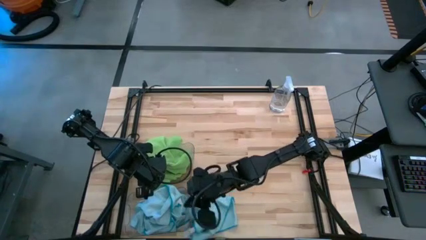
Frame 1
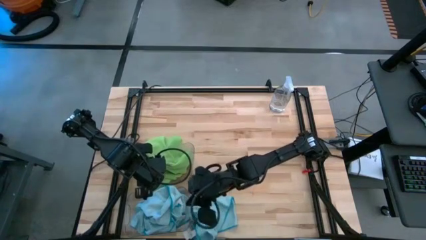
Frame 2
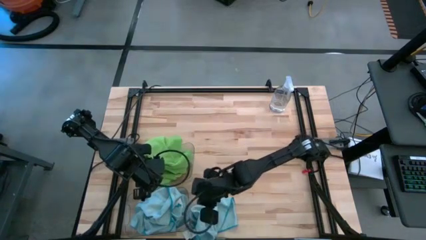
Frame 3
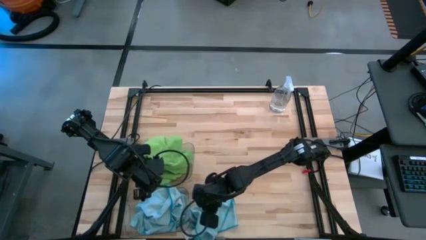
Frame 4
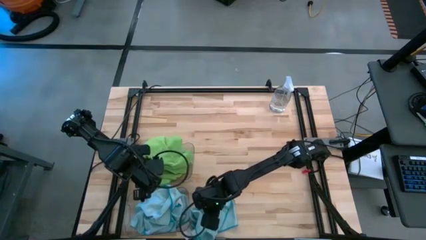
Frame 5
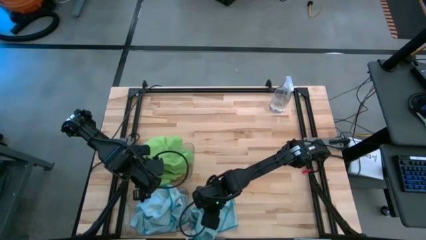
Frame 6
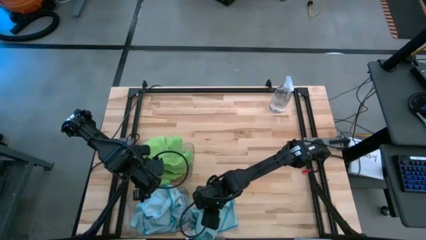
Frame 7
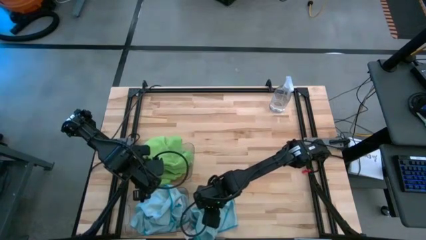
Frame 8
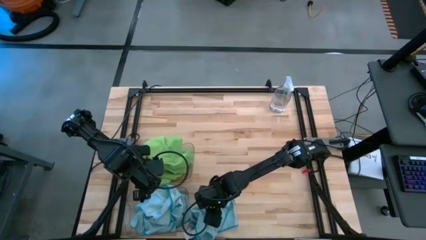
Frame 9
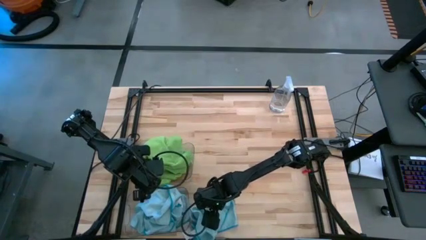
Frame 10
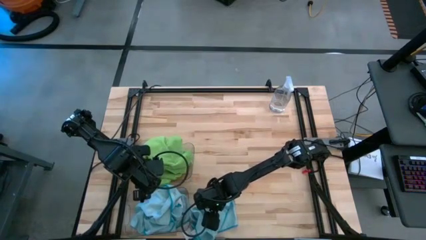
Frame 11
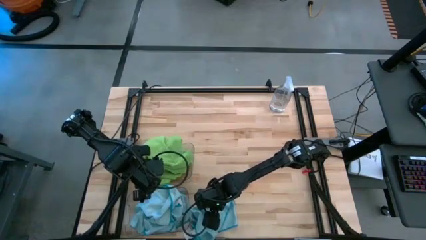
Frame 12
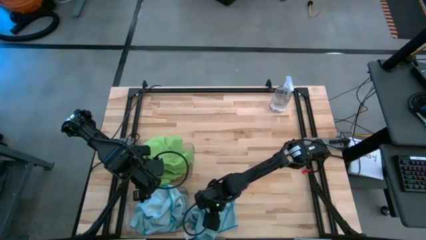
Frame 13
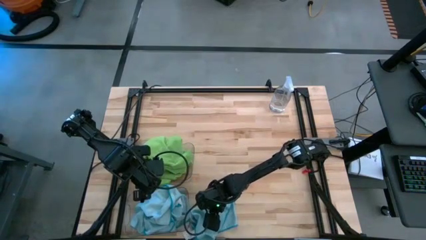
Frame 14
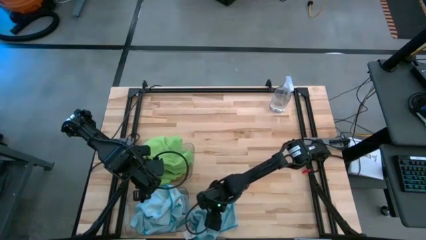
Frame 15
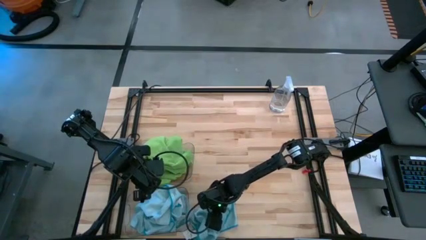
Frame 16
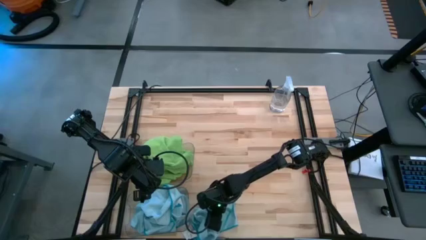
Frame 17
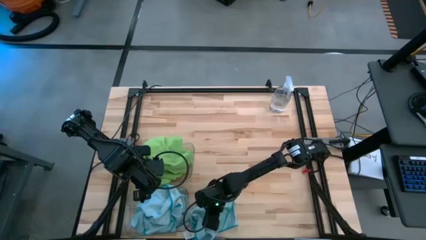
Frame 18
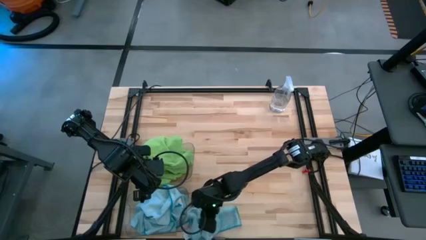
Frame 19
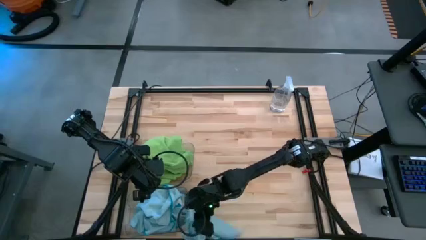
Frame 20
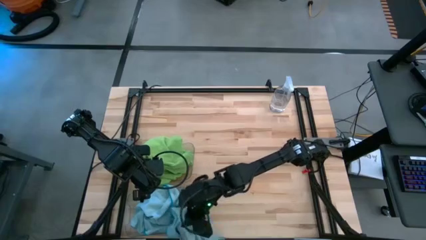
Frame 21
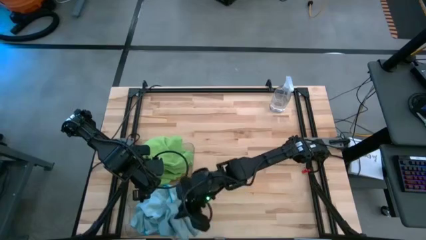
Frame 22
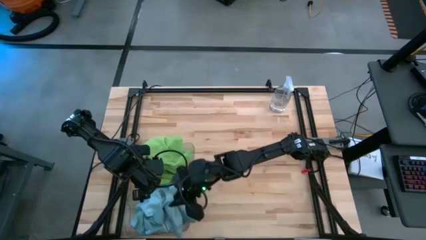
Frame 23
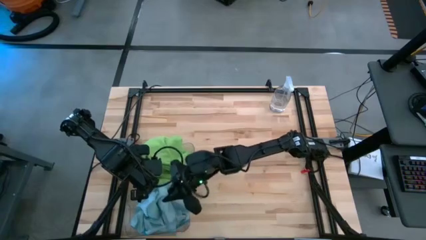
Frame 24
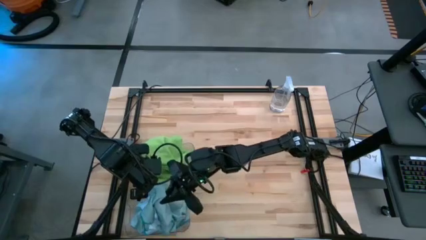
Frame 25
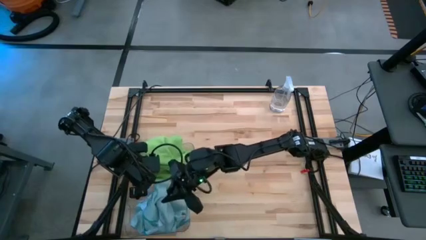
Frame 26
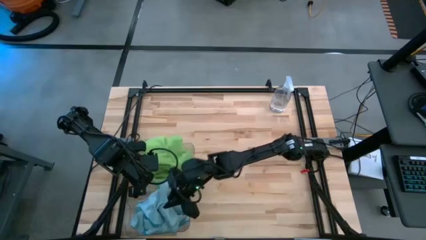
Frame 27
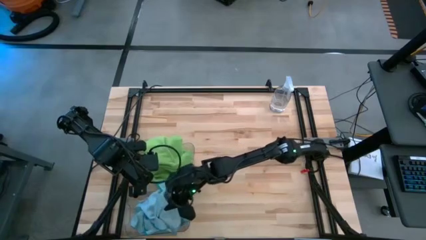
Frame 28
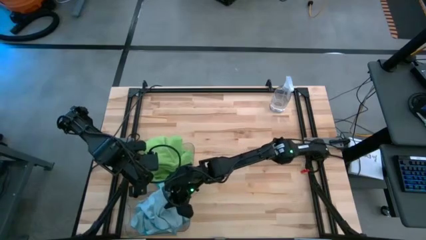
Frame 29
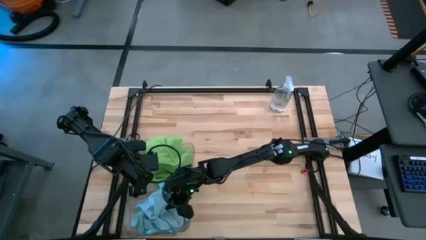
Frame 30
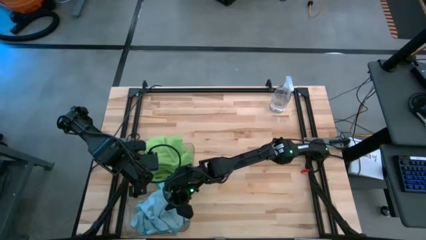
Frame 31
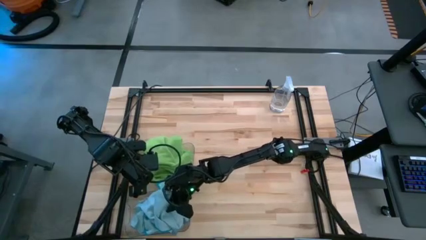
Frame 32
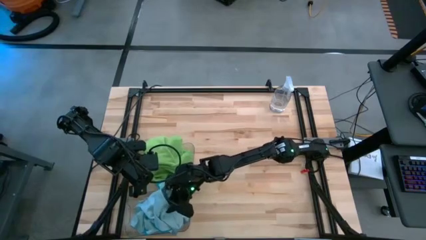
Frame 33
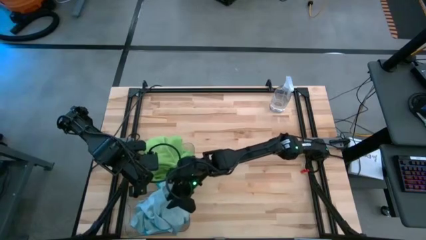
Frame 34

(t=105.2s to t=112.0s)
Task: Sort microfiber towel by color & place in baskets
Put the blue microfiber cloth into the bottom transparent bin

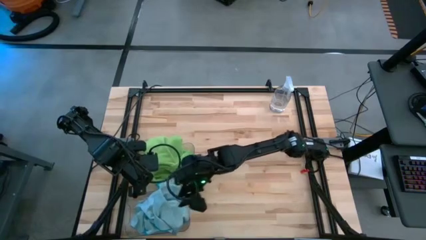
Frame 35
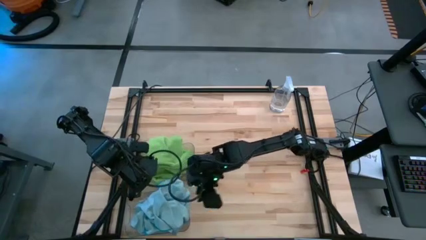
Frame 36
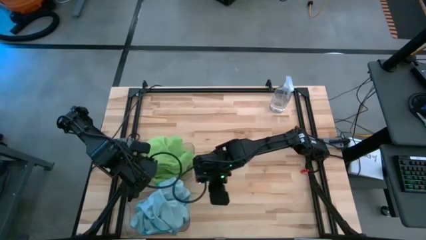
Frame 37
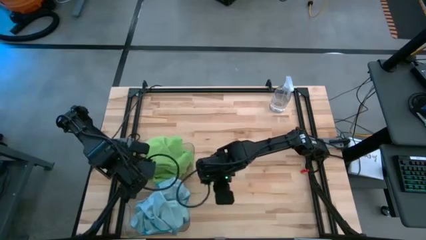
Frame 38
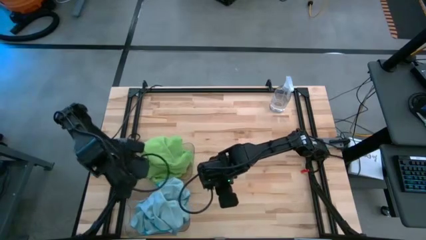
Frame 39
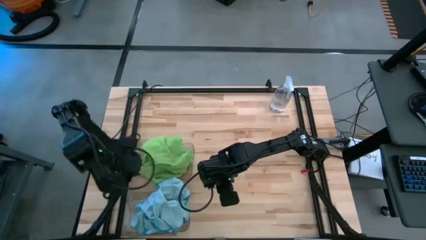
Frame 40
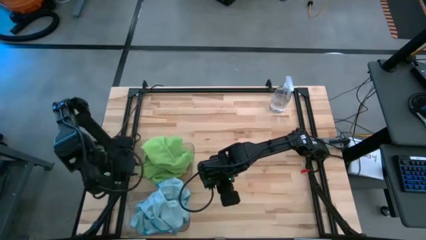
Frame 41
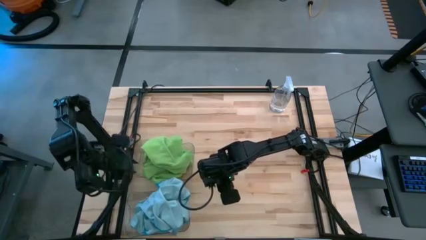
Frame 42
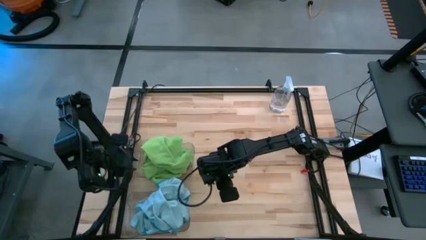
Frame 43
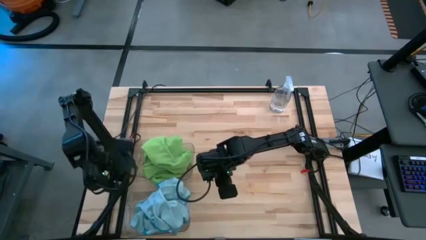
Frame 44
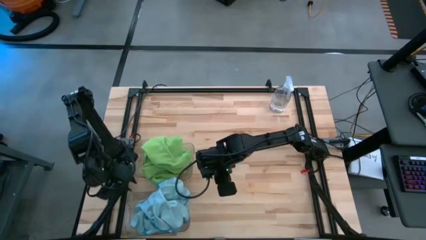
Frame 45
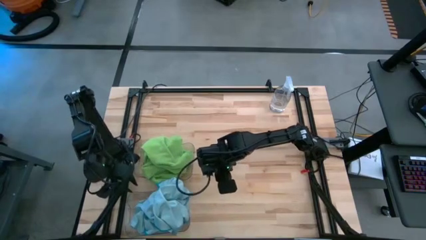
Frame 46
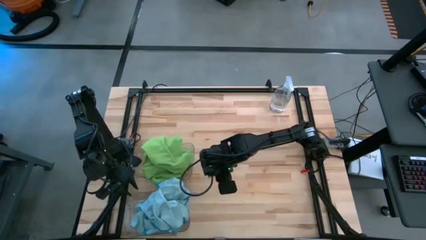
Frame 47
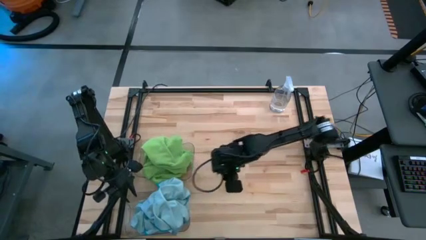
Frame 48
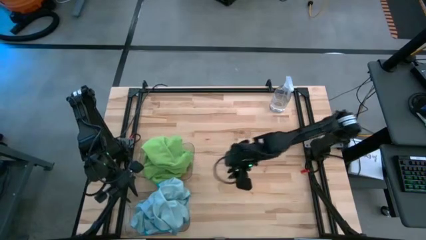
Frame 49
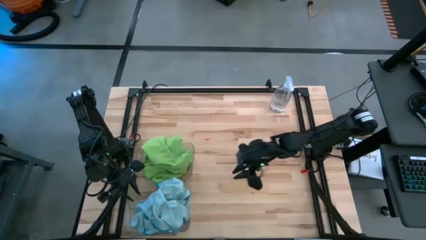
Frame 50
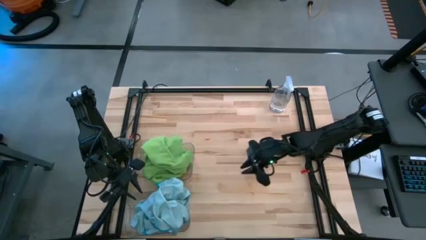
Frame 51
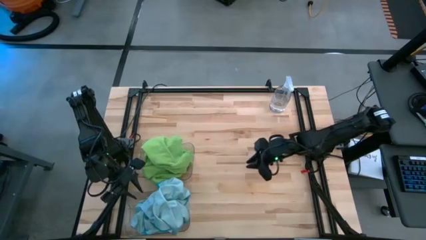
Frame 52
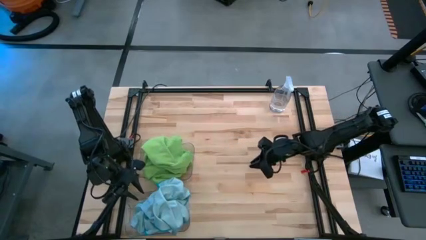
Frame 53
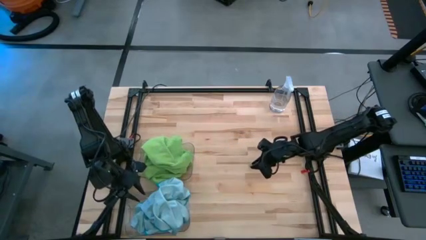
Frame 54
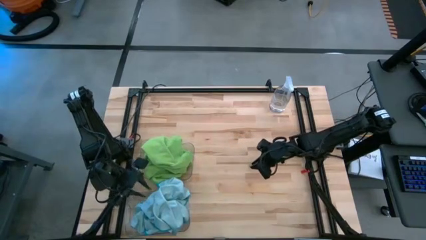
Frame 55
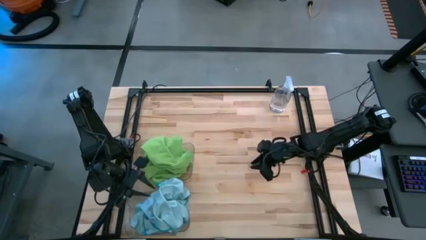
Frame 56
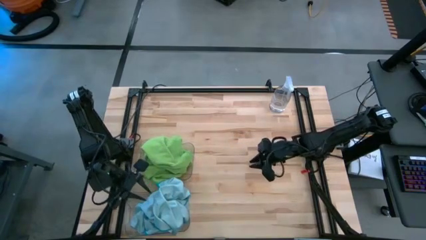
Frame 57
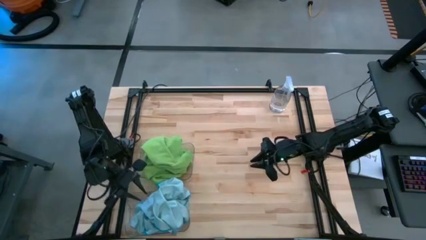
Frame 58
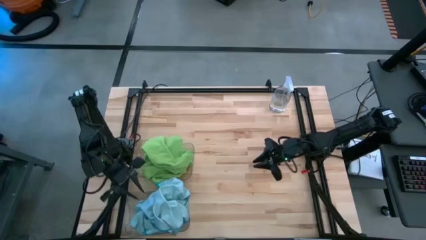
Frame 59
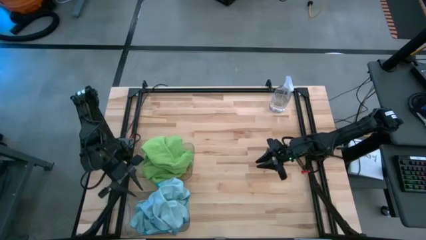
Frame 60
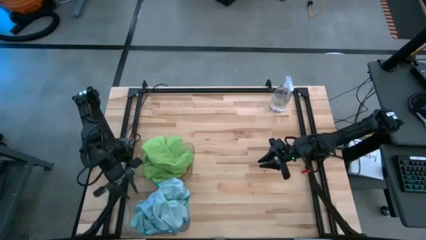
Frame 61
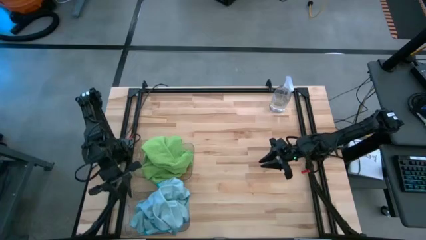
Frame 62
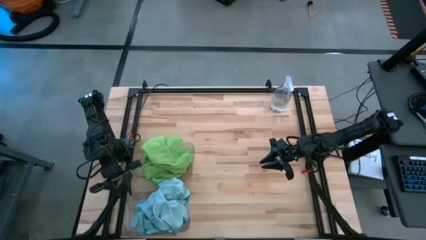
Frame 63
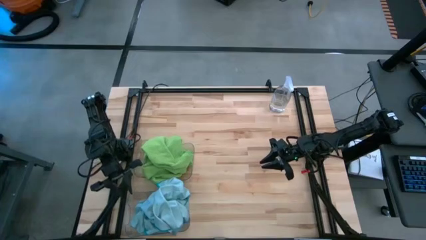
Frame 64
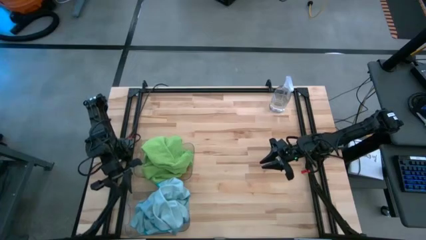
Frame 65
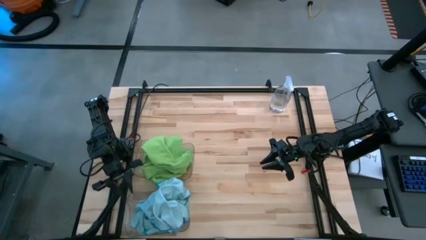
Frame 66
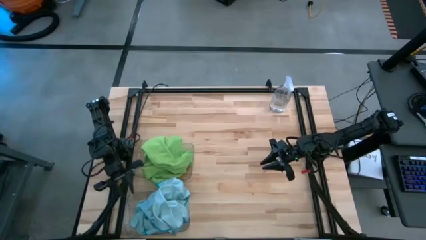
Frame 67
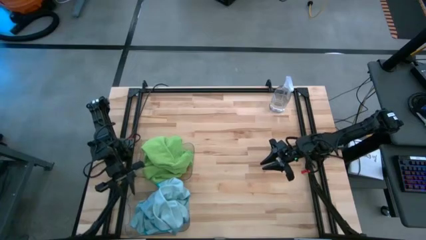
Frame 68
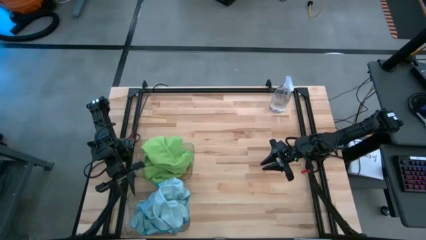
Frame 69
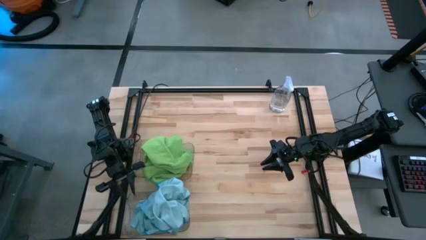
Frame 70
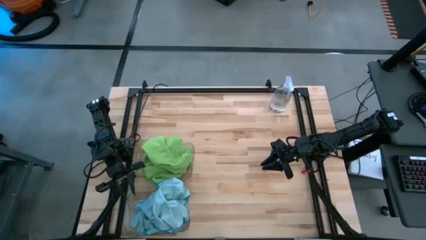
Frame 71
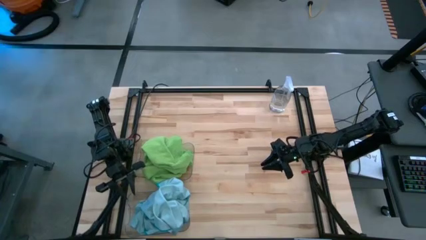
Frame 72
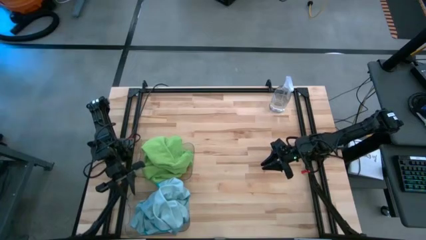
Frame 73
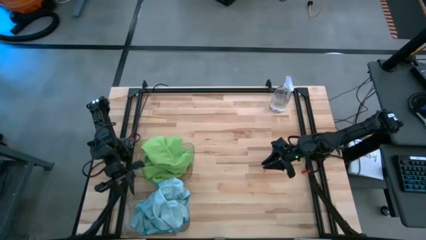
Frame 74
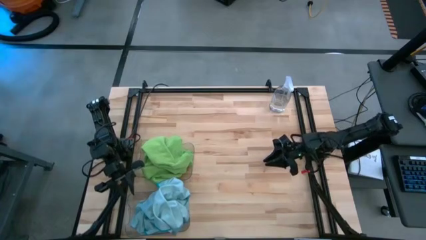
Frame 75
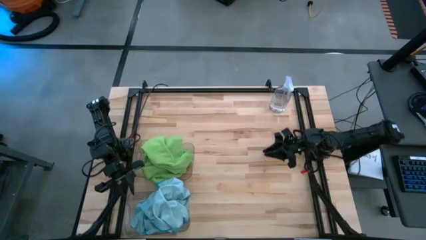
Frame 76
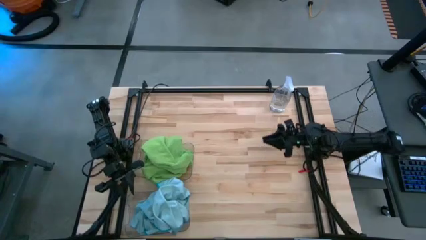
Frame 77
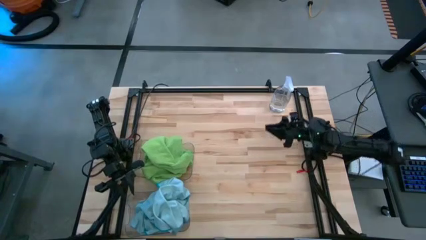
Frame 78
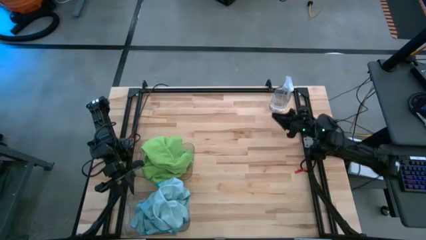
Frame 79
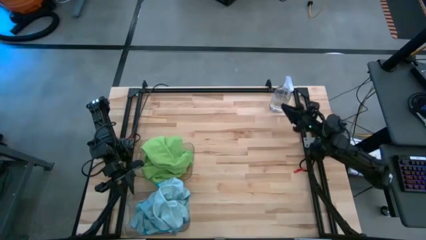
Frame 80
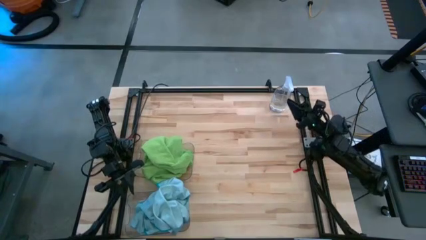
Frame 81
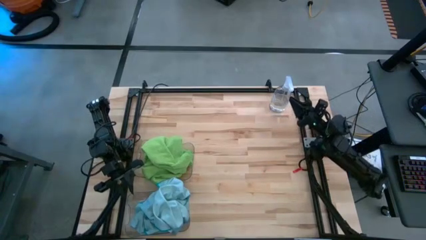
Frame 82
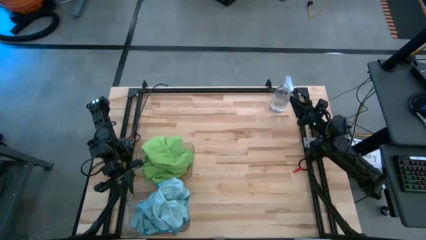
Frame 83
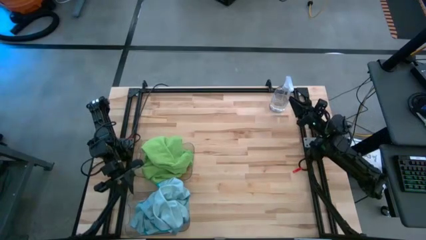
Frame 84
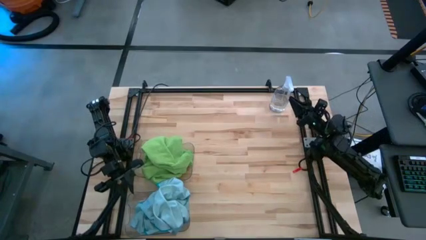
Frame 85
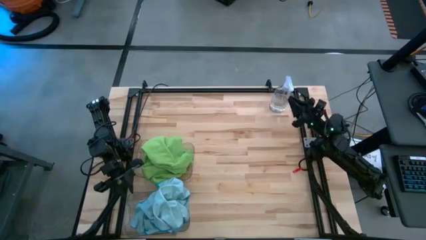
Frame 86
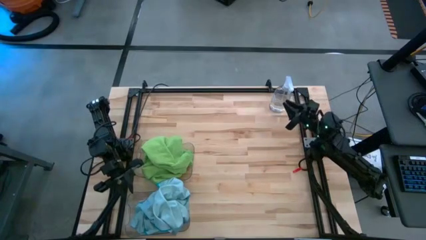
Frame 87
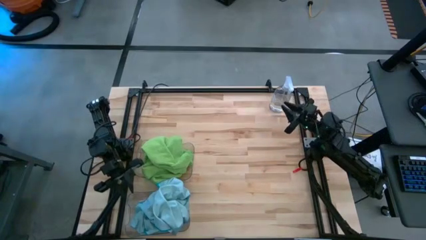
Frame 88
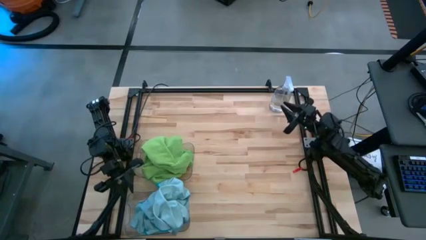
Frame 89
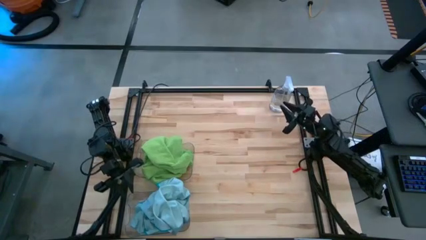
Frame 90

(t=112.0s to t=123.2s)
Return to Home Position
